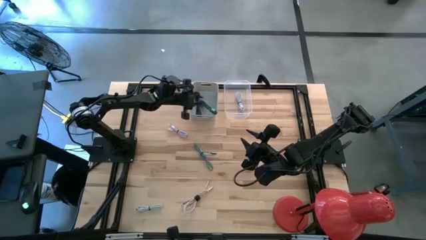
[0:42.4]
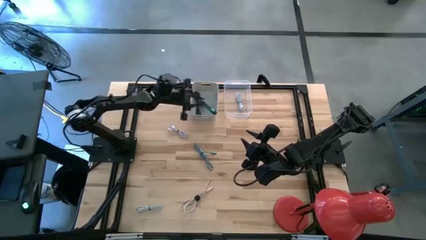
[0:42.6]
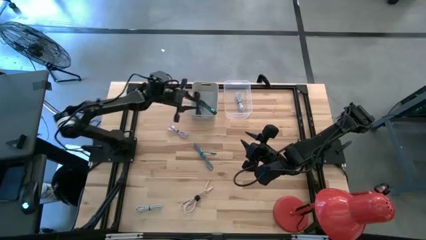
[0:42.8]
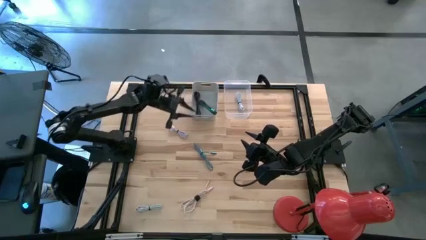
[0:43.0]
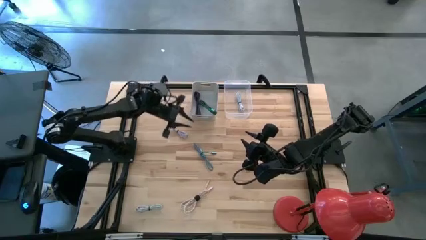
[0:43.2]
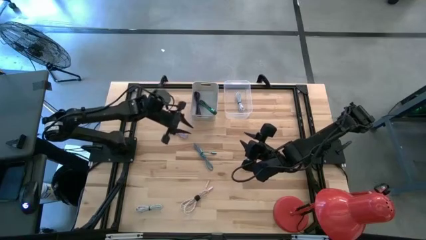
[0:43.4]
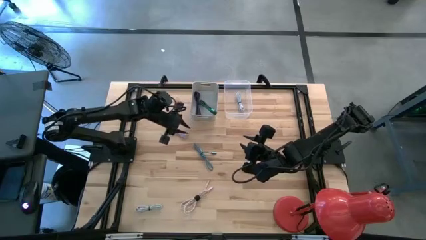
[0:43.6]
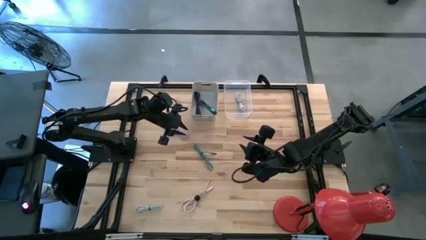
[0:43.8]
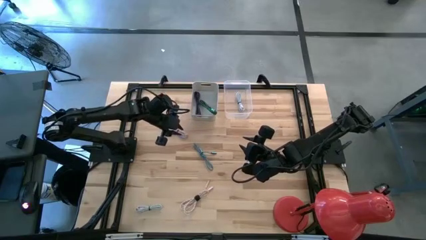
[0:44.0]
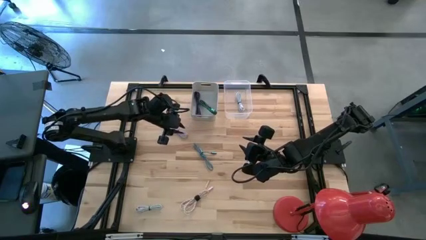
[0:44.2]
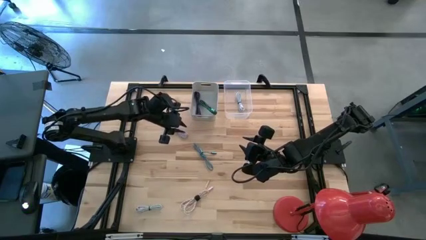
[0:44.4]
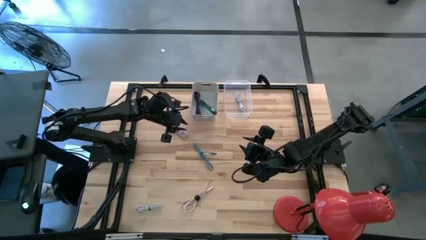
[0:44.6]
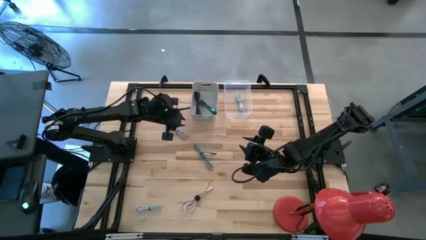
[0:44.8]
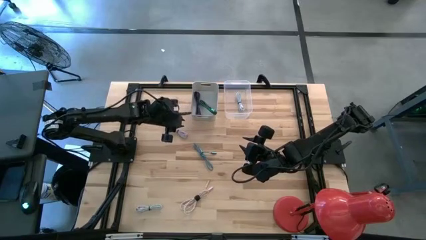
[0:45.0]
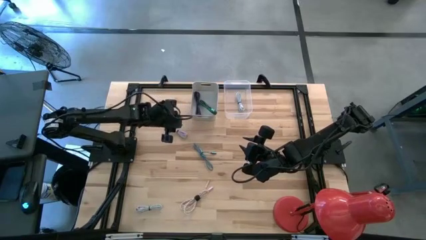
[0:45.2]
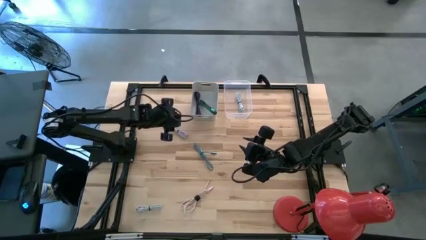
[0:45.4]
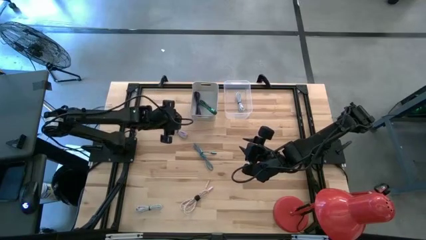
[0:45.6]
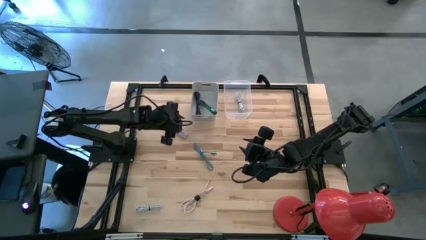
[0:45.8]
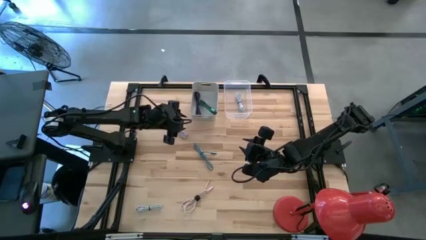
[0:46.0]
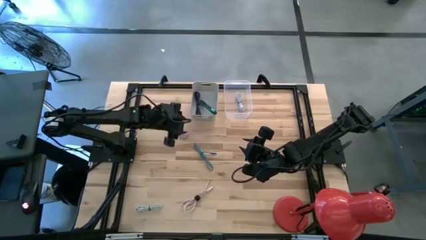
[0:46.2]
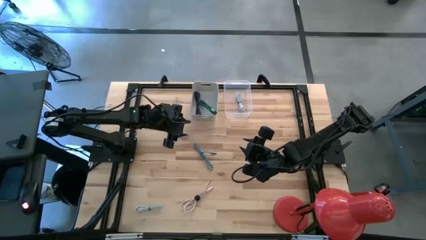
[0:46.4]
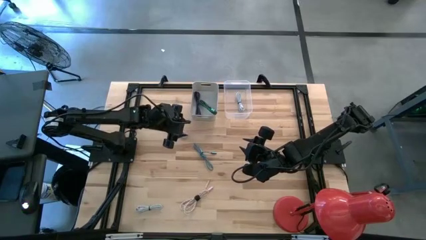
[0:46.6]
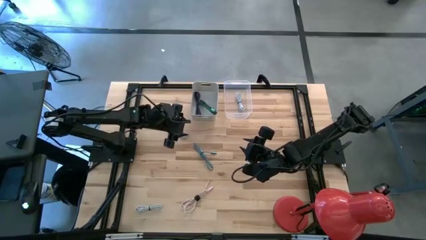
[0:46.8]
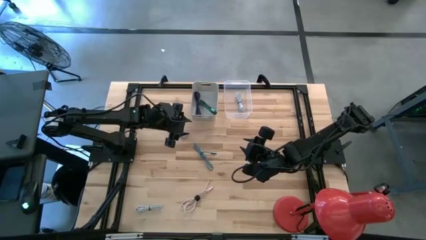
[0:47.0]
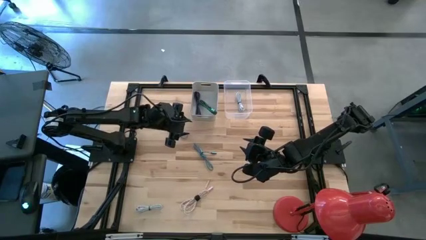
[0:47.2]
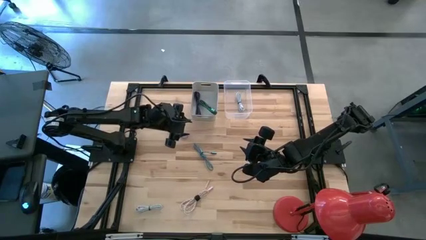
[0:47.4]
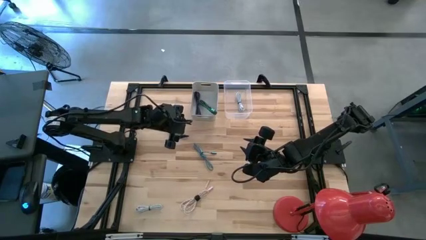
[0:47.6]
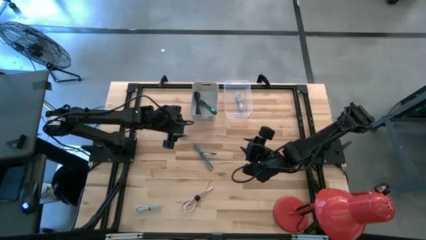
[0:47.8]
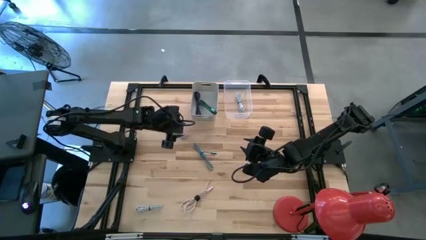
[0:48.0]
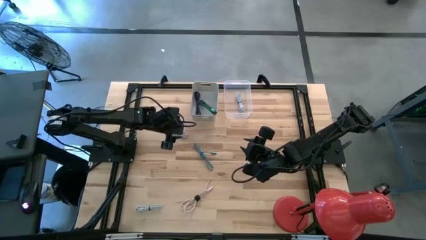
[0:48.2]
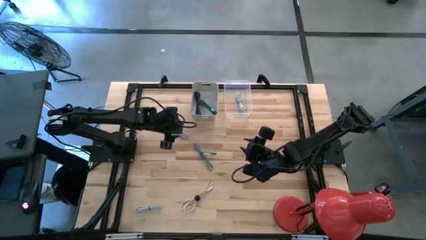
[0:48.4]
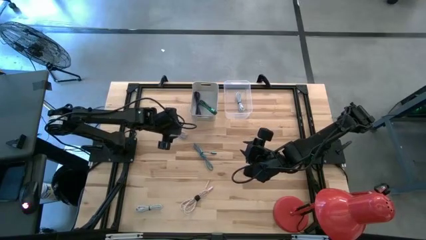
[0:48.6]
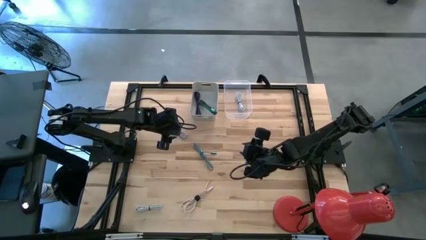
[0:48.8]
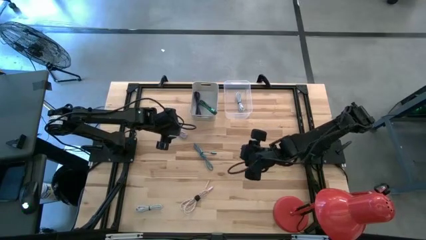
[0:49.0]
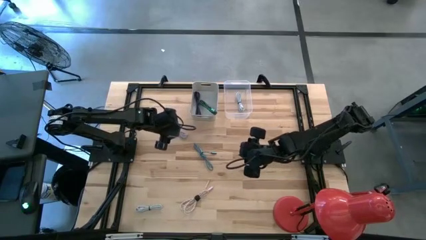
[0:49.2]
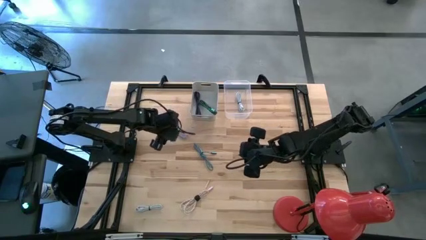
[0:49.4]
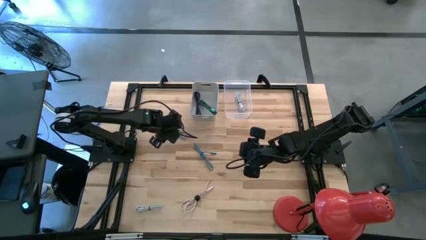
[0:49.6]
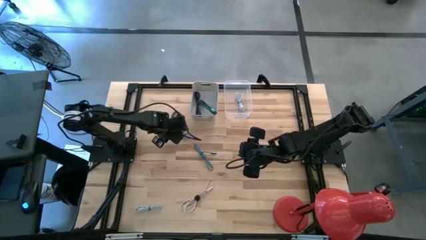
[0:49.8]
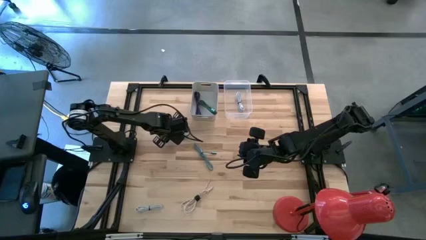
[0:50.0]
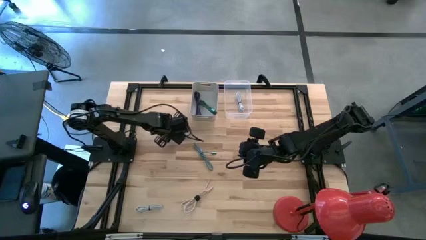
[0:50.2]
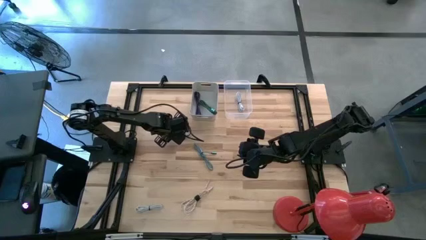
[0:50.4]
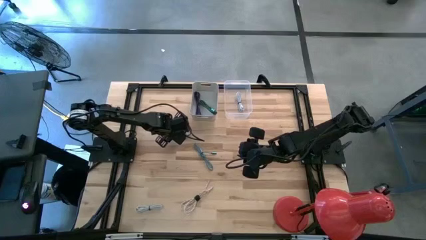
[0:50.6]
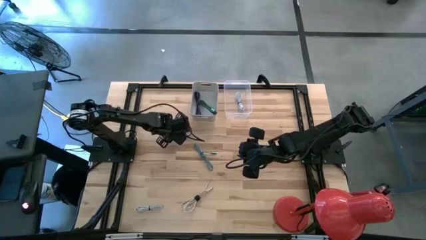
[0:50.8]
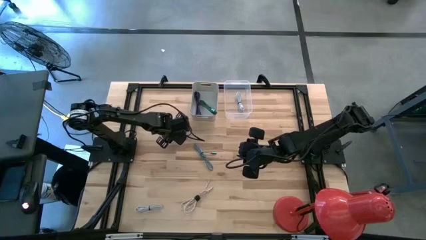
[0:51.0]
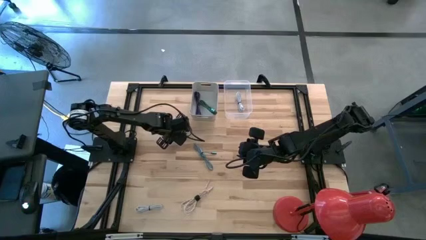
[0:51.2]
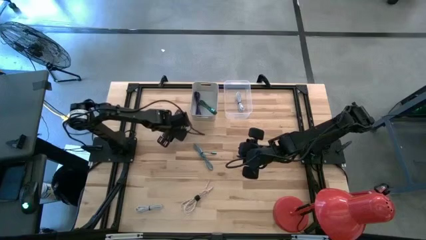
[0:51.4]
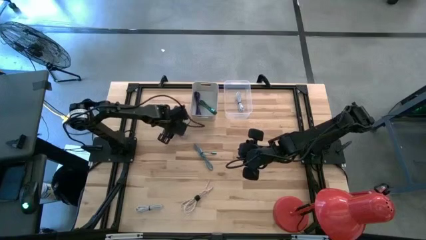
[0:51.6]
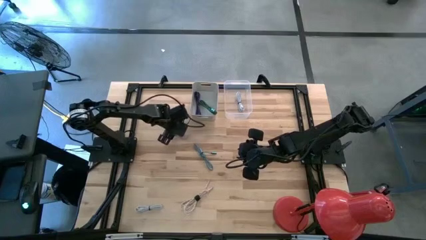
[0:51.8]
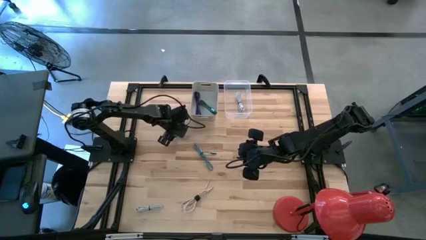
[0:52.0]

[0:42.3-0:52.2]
Task: Pick & Place USB Port
Put the purple charger cable into the transparent bin
